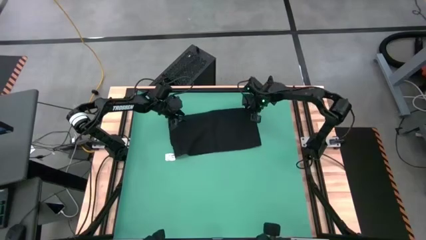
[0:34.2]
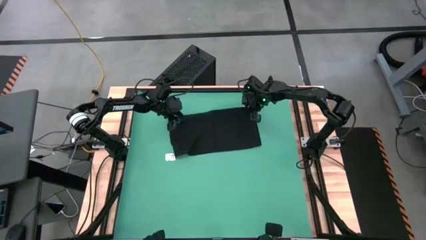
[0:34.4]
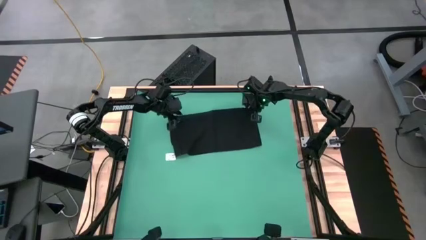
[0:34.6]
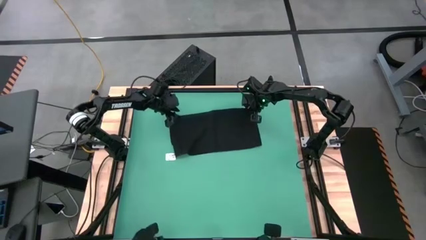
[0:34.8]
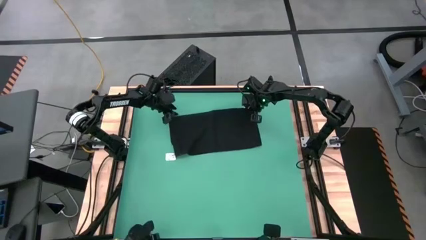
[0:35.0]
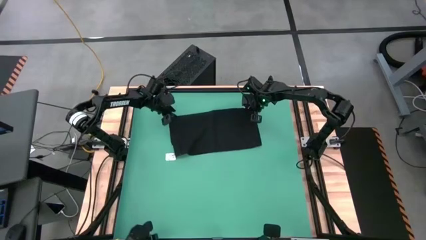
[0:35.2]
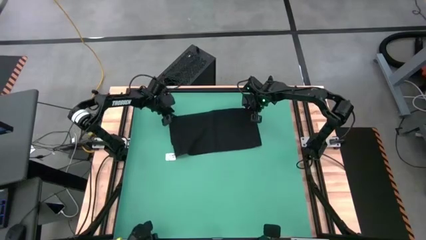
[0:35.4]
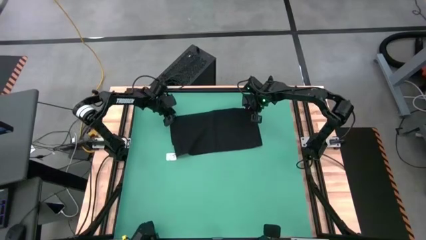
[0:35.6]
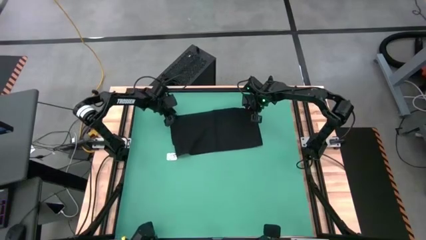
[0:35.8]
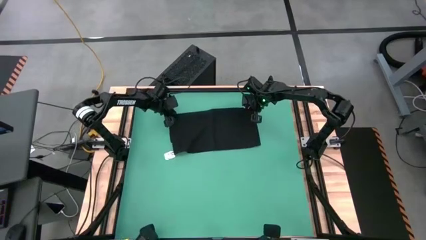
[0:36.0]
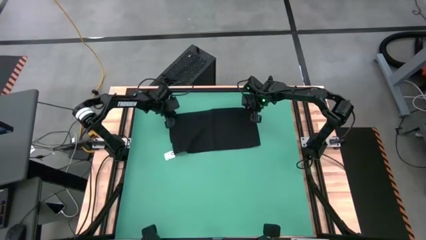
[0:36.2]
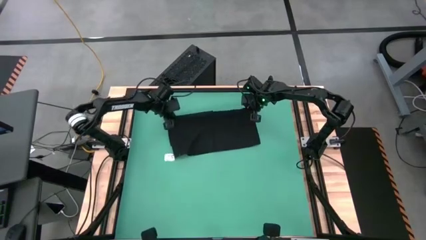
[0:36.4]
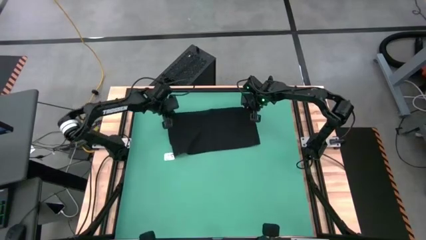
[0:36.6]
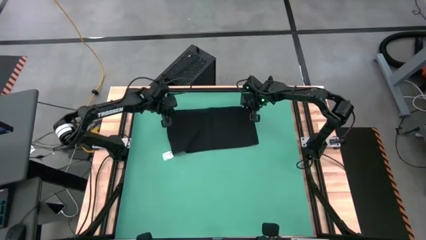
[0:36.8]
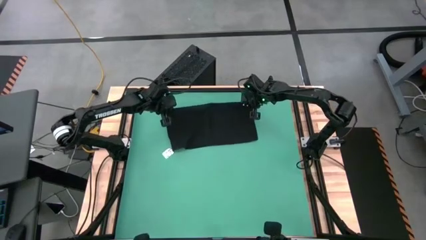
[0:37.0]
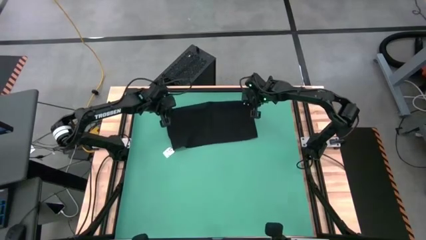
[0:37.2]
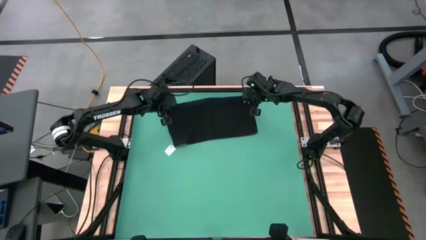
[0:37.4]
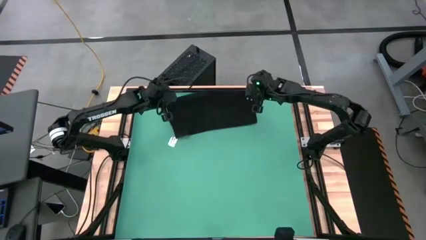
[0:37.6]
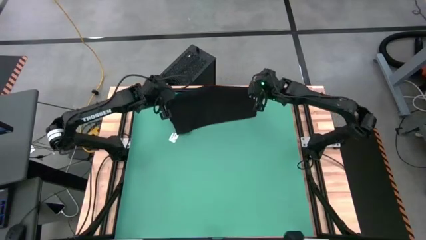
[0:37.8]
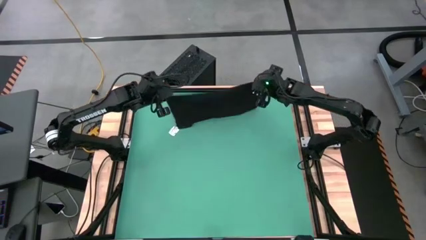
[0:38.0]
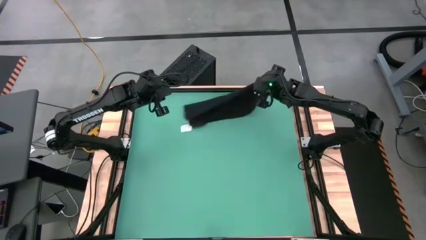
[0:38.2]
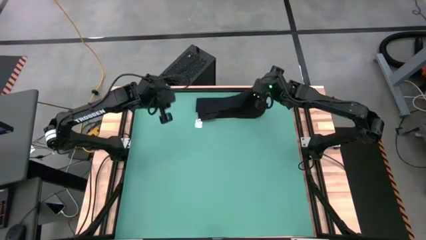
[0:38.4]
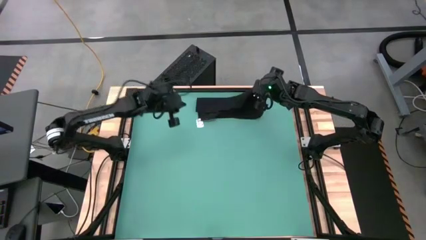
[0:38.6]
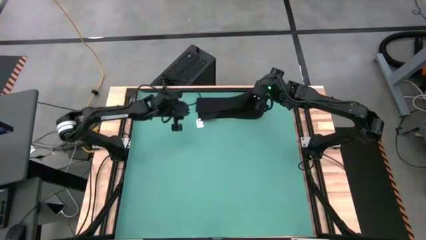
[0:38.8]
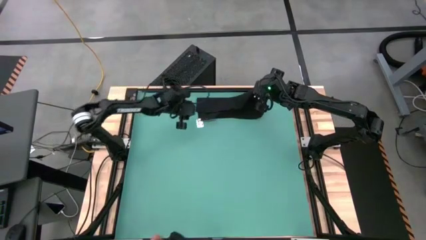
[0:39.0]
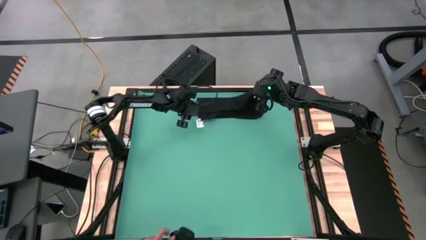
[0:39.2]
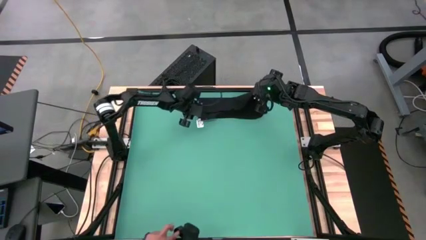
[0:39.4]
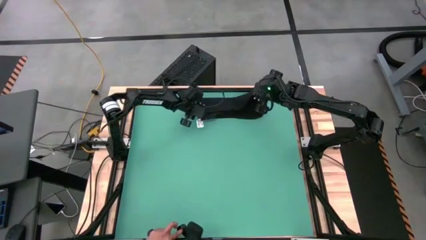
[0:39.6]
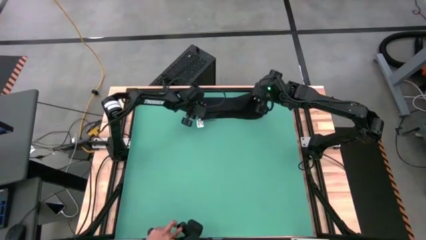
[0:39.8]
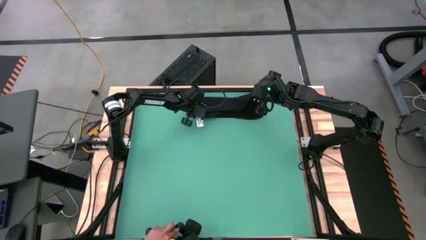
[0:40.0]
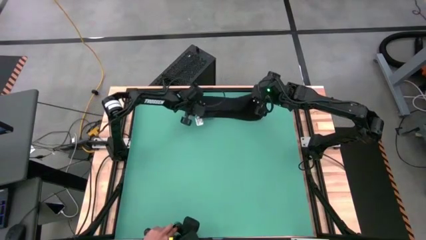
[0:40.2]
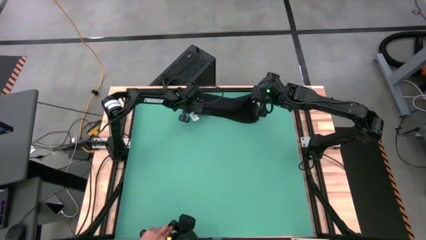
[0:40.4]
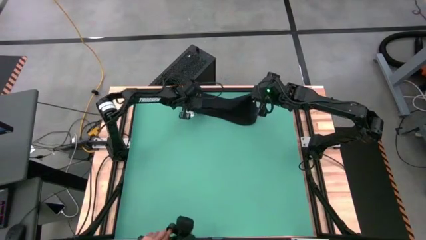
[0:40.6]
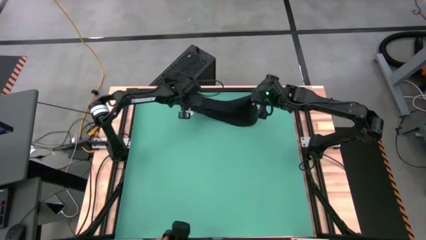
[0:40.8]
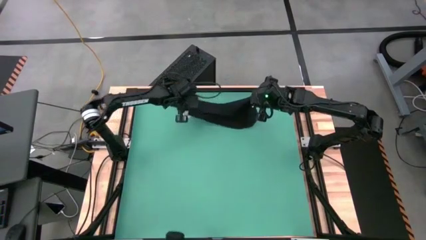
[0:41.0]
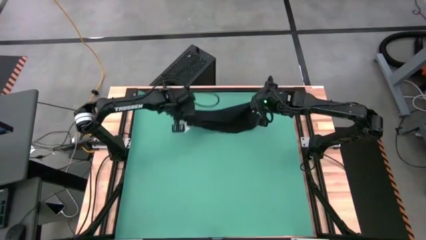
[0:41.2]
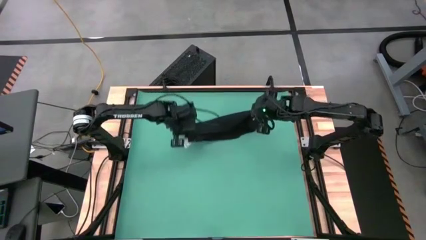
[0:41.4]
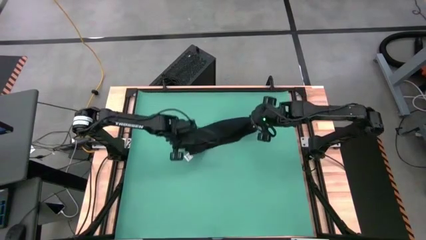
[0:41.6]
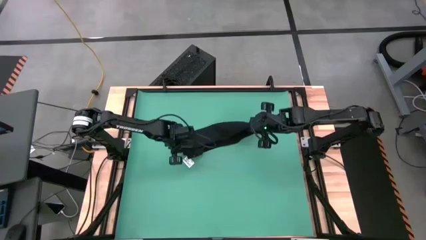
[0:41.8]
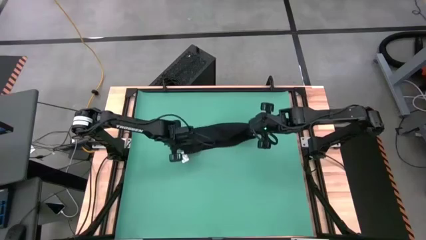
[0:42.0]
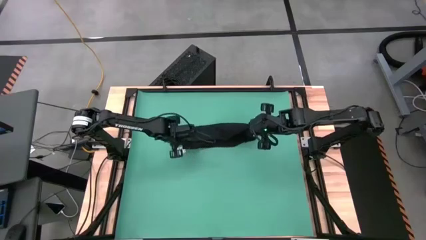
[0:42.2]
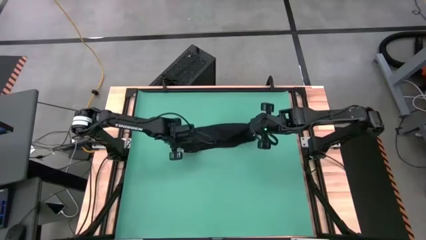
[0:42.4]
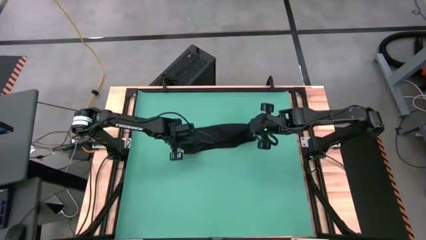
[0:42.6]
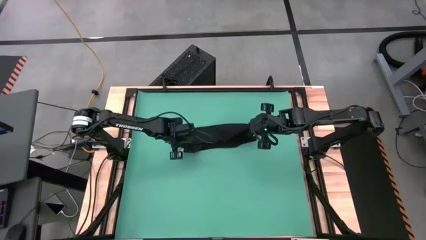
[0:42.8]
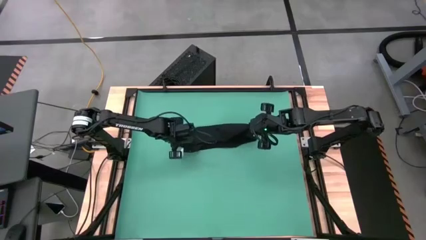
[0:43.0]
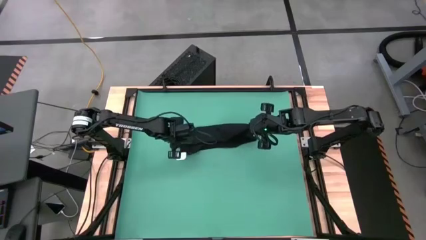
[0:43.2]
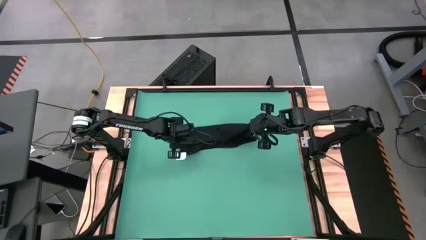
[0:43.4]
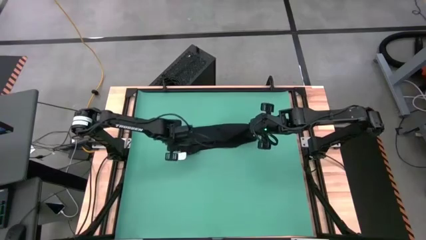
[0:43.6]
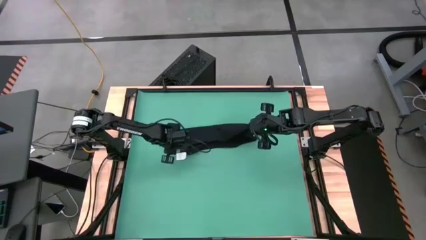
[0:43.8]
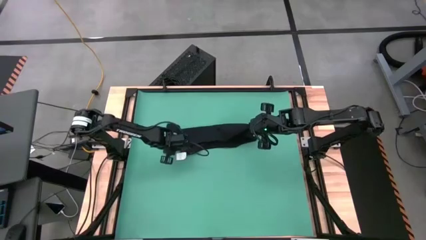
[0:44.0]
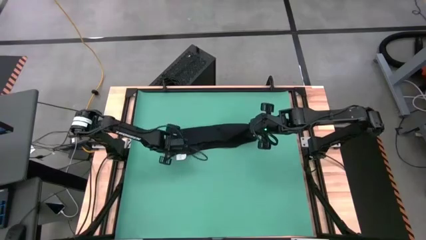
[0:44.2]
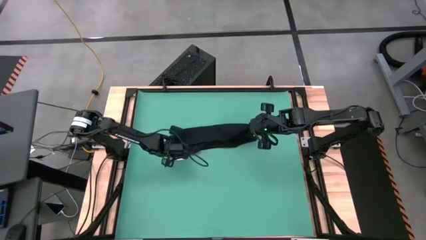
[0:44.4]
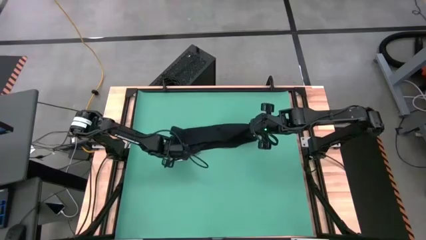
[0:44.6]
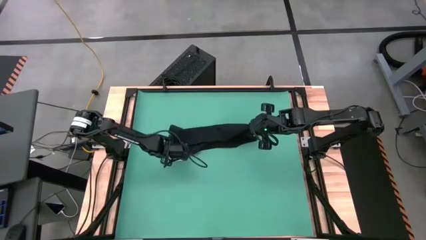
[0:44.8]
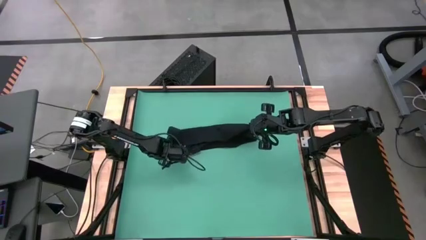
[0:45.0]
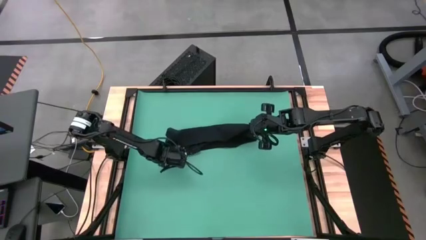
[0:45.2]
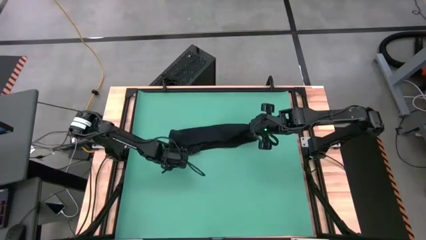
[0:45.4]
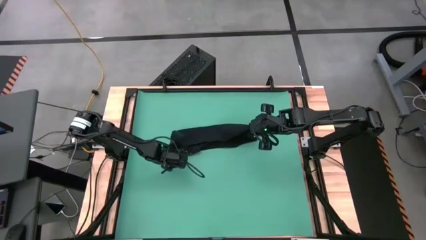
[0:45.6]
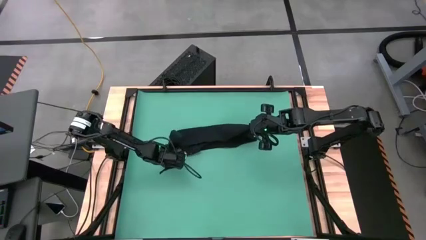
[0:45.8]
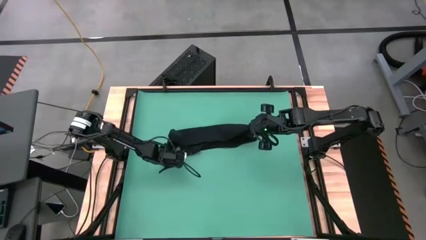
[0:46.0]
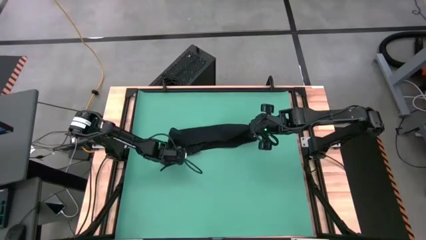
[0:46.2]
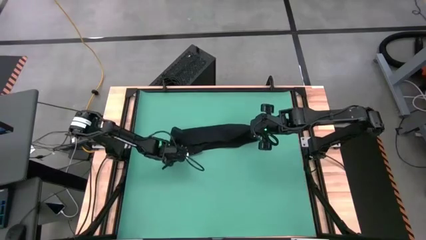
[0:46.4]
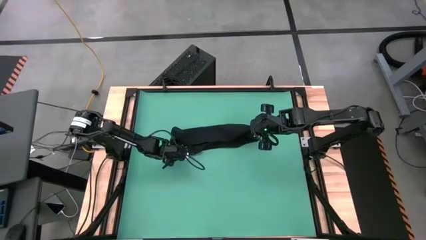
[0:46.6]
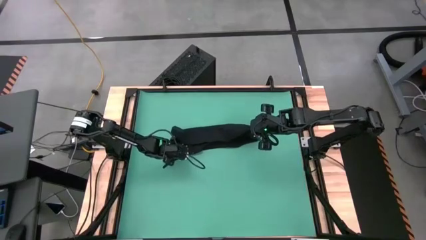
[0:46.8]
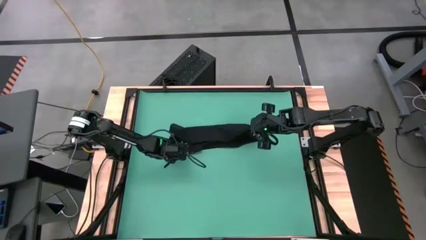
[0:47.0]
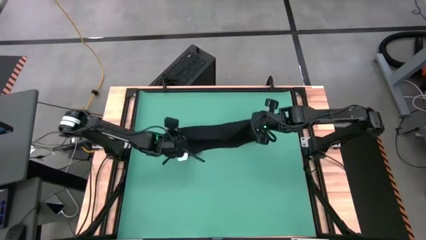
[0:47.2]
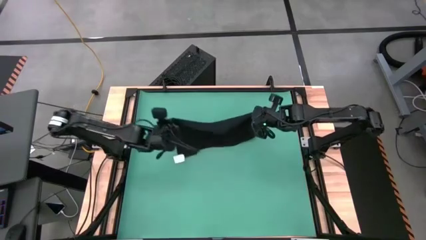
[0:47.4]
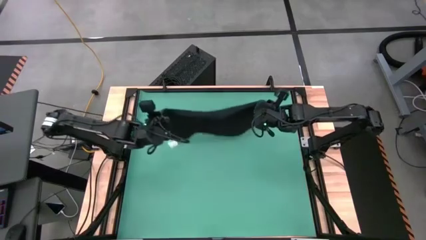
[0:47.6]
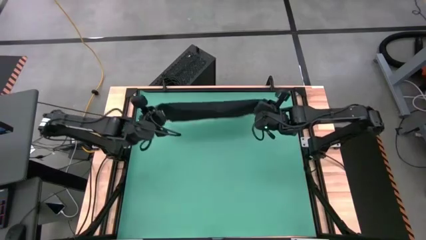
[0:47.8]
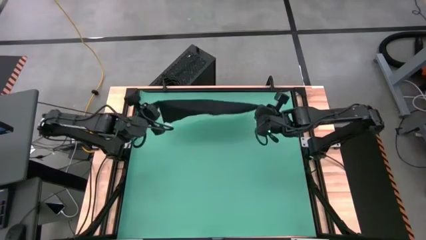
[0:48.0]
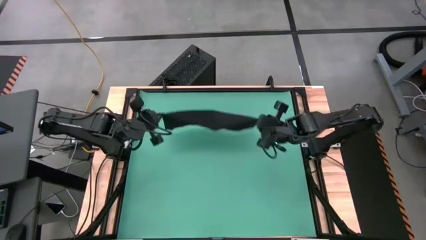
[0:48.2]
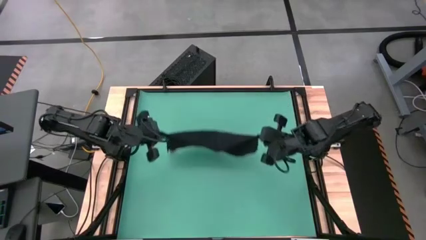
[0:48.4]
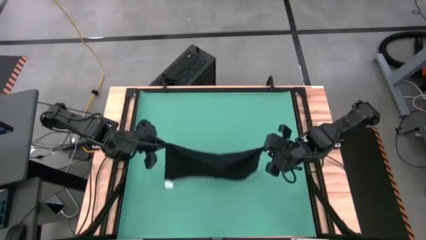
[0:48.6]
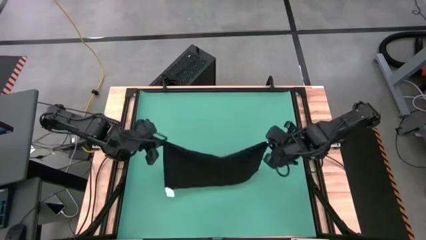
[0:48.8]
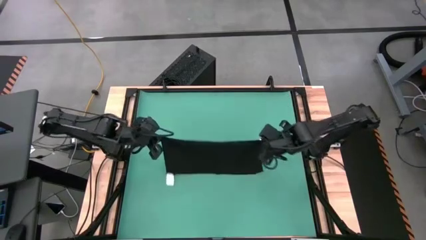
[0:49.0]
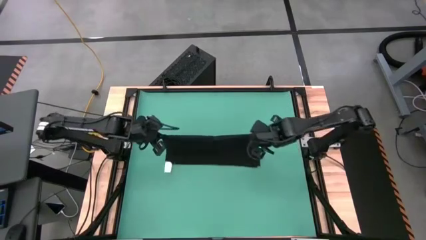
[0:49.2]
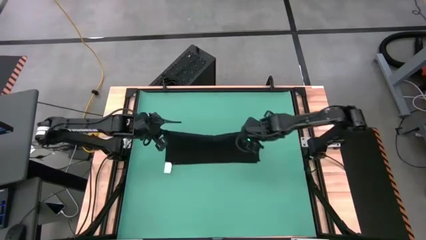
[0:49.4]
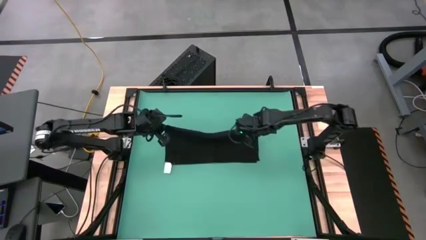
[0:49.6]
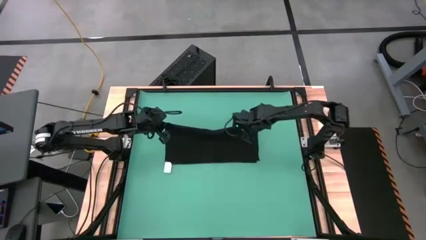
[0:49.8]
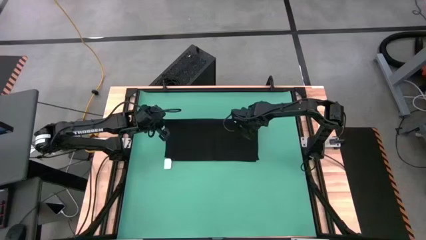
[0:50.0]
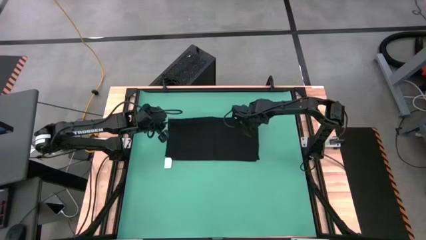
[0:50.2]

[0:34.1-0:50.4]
Task: Roll towel into tight, uniform cylinder
Fold the towel
